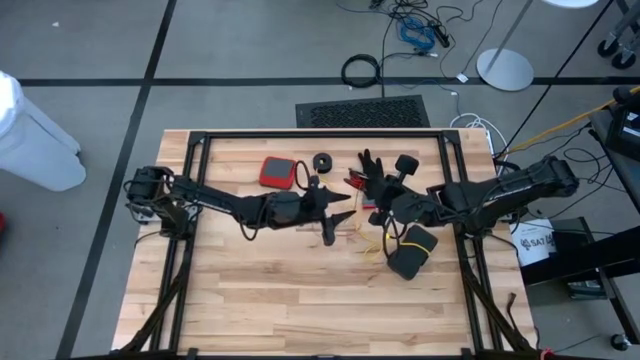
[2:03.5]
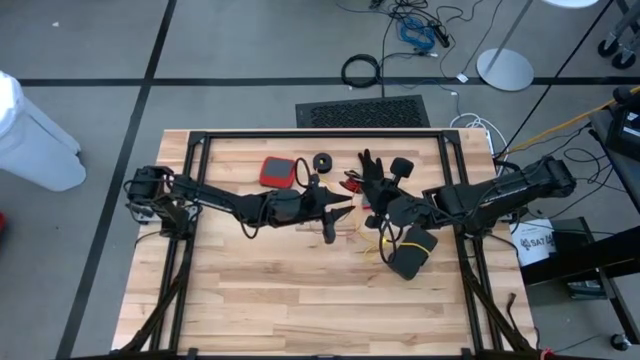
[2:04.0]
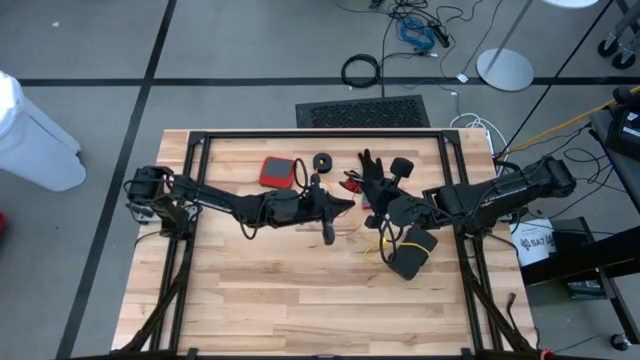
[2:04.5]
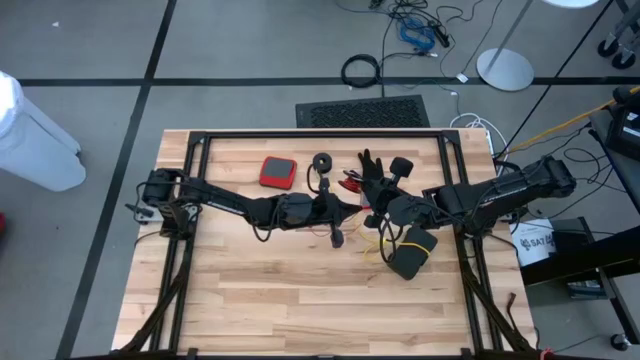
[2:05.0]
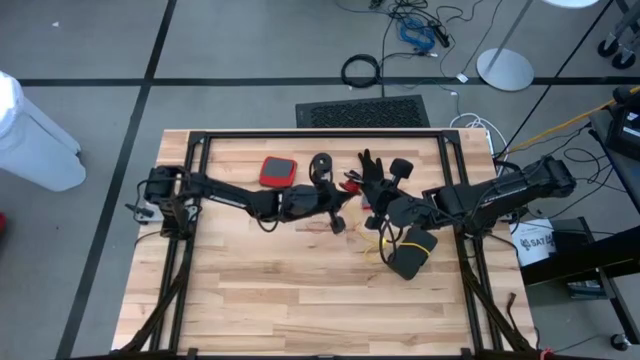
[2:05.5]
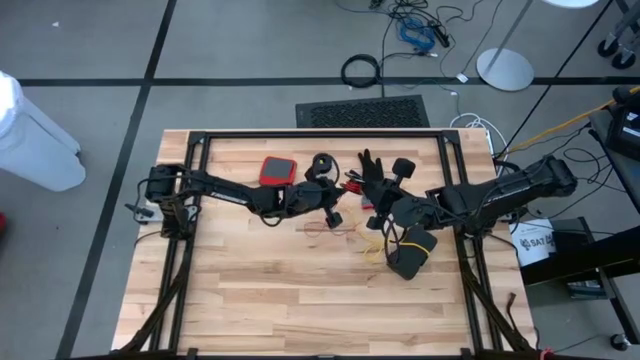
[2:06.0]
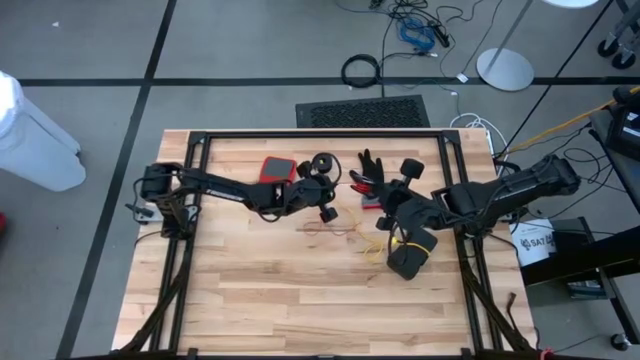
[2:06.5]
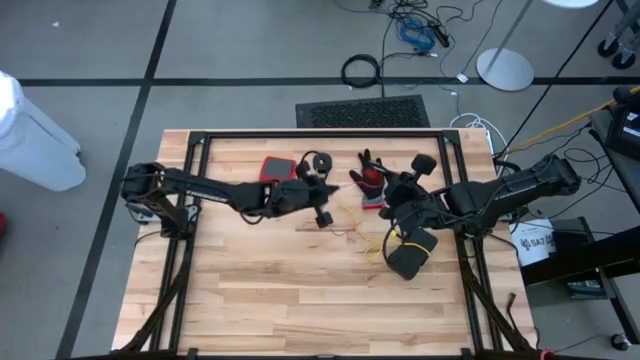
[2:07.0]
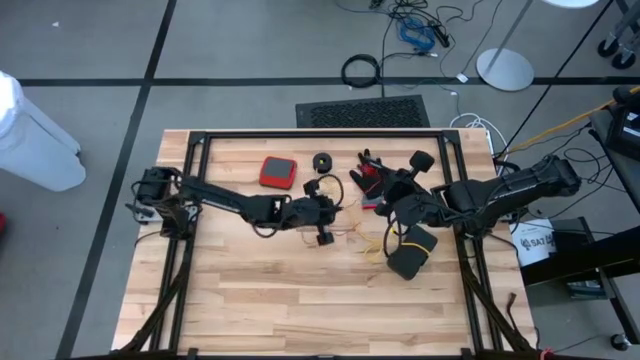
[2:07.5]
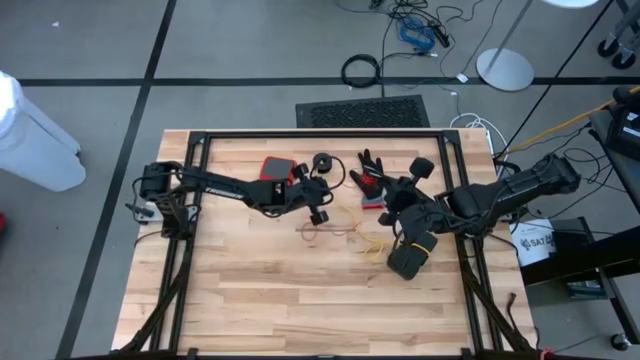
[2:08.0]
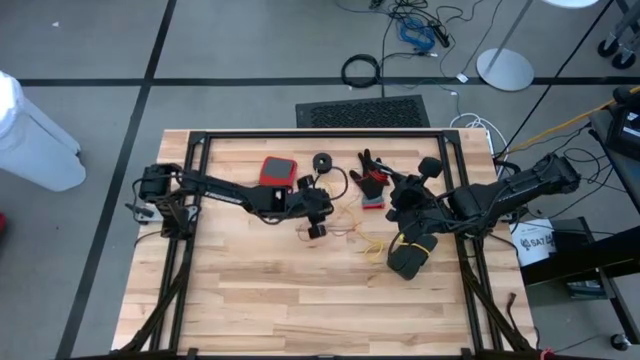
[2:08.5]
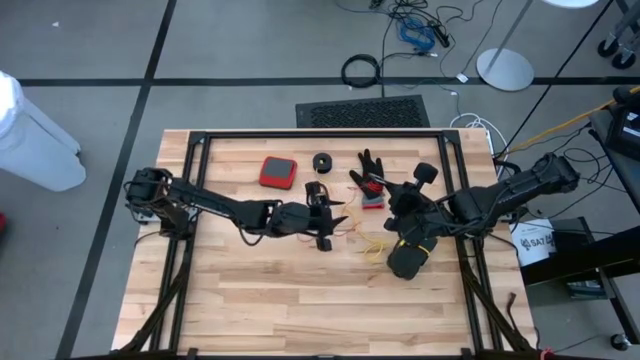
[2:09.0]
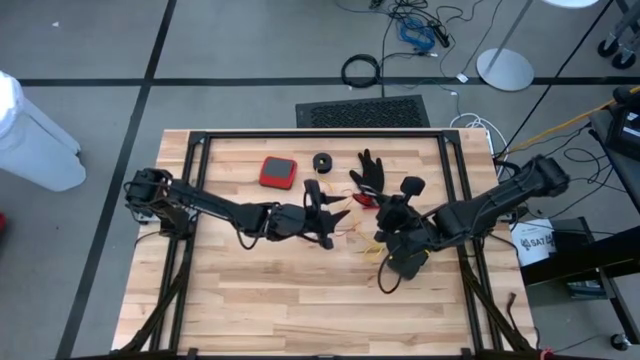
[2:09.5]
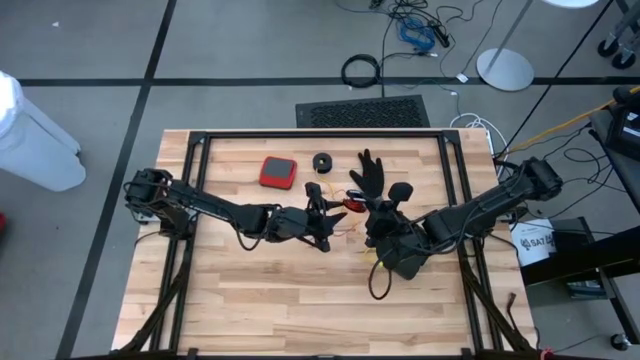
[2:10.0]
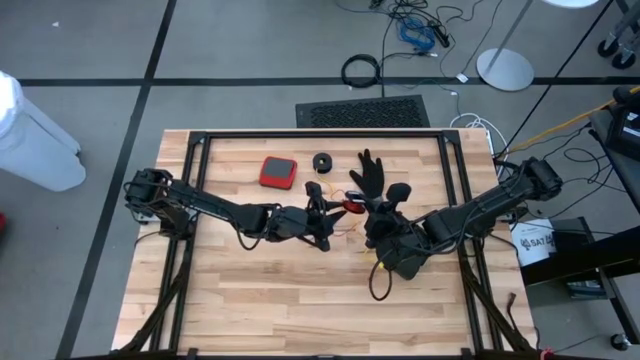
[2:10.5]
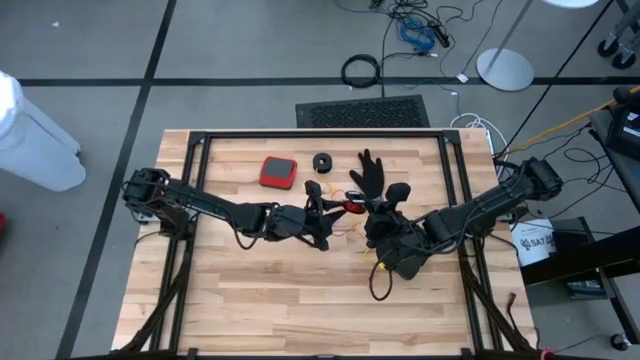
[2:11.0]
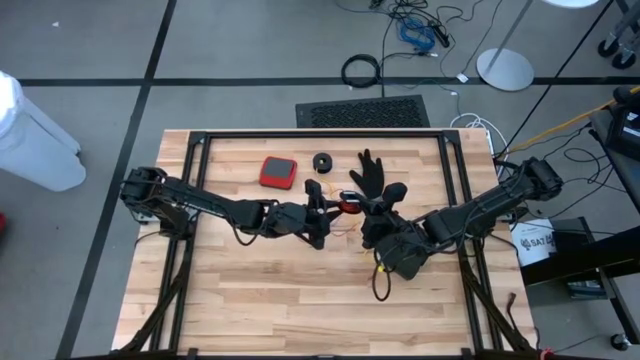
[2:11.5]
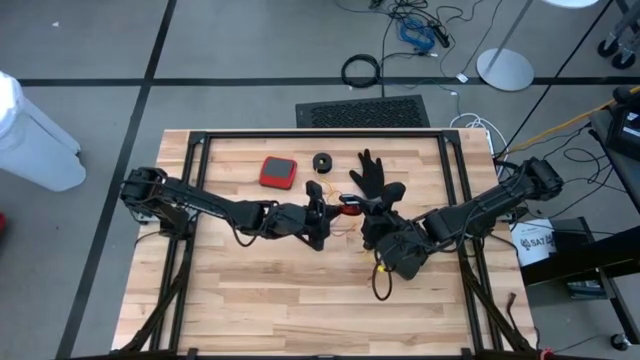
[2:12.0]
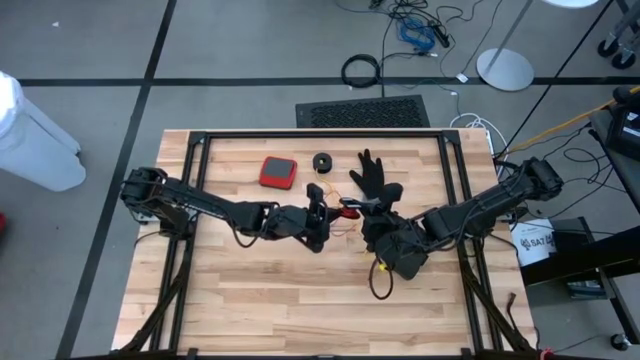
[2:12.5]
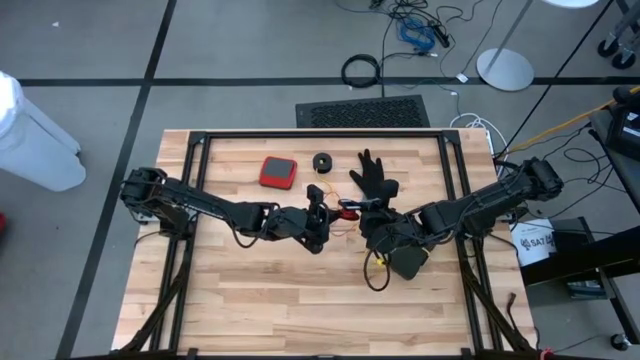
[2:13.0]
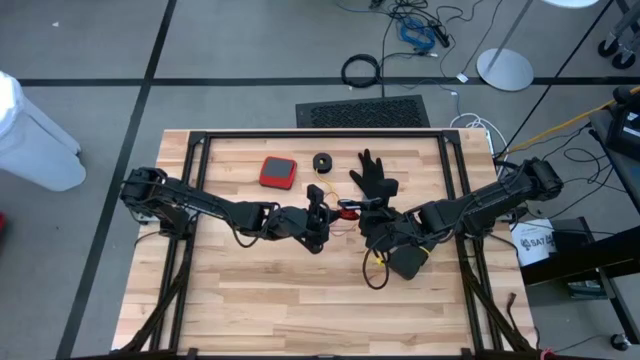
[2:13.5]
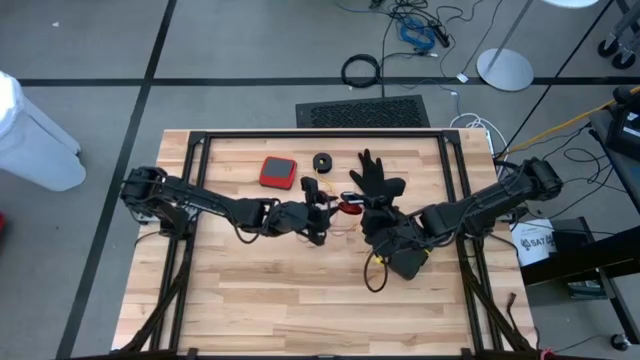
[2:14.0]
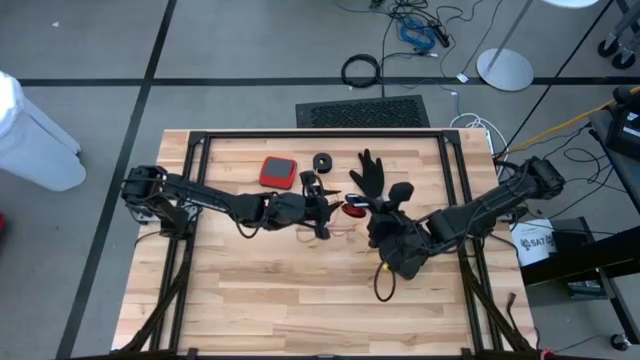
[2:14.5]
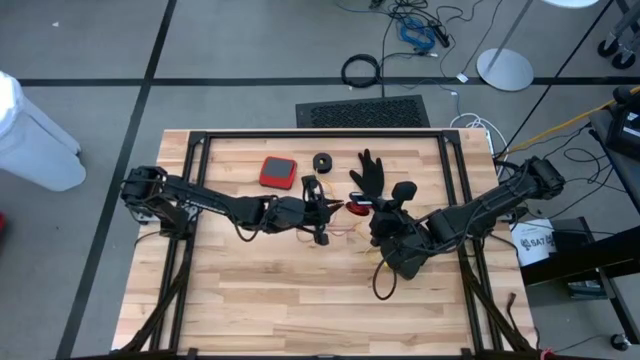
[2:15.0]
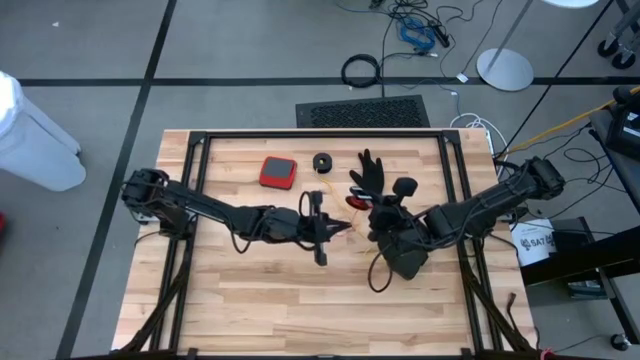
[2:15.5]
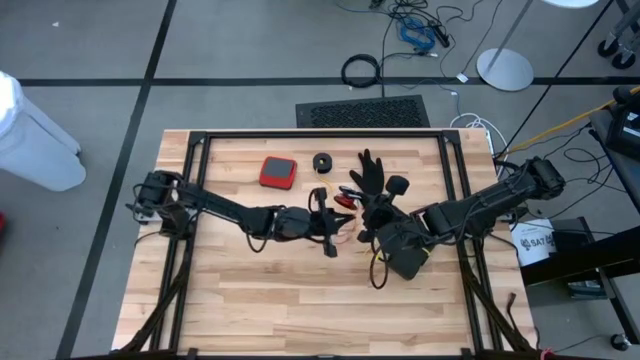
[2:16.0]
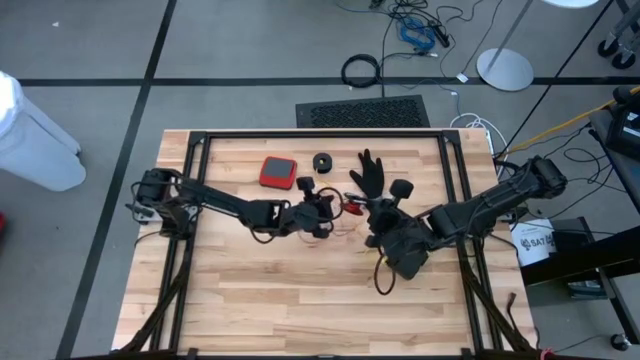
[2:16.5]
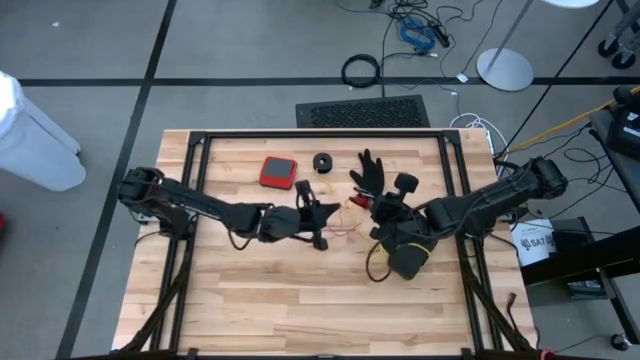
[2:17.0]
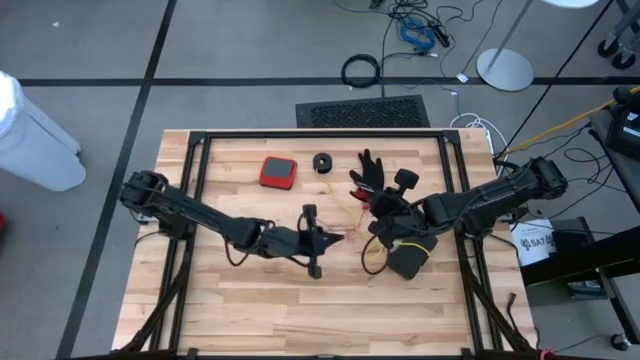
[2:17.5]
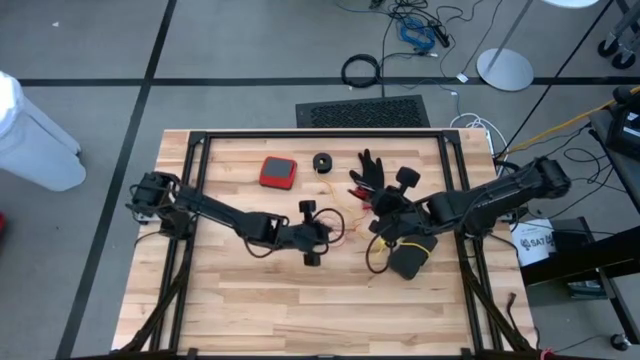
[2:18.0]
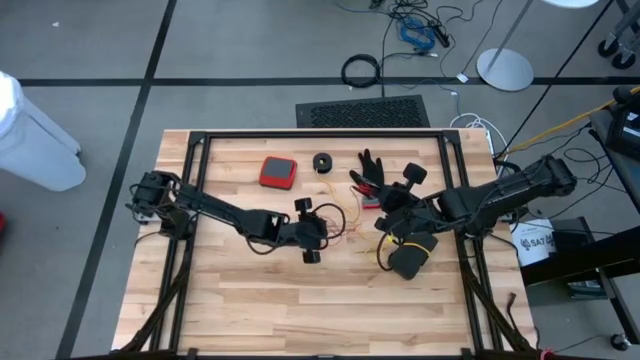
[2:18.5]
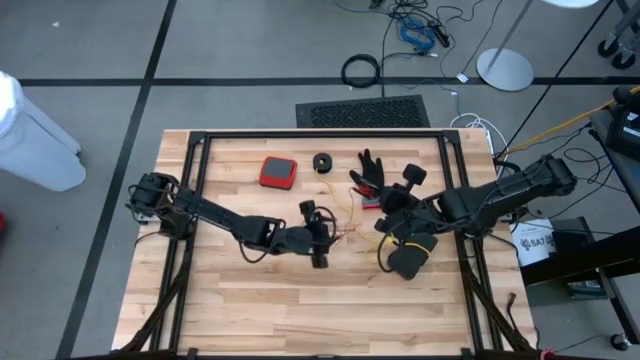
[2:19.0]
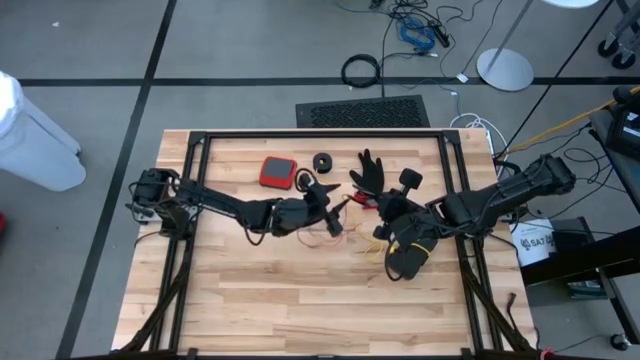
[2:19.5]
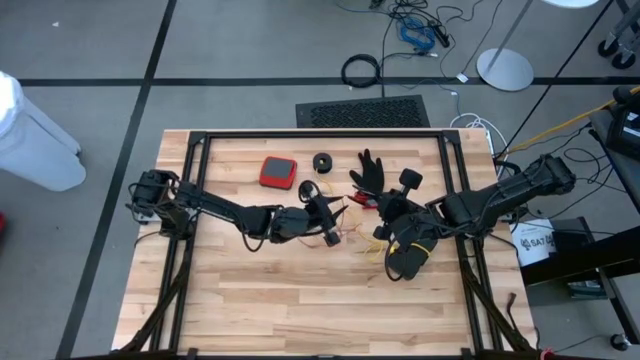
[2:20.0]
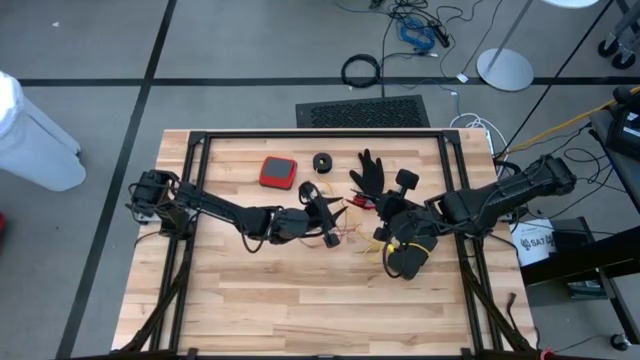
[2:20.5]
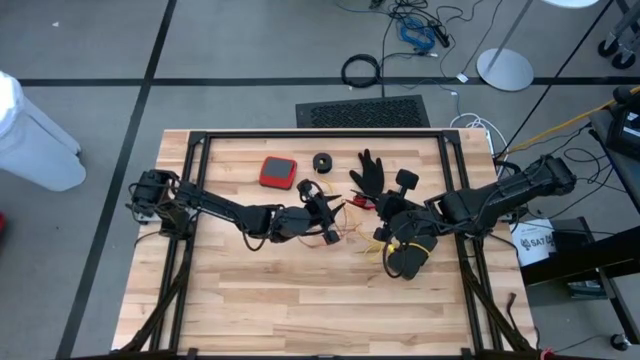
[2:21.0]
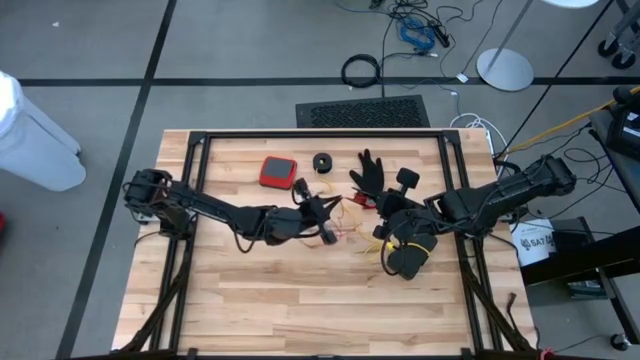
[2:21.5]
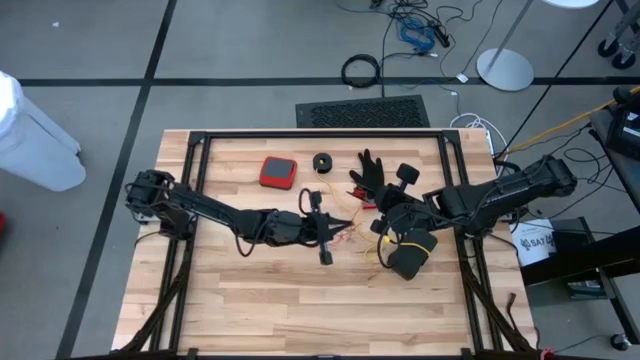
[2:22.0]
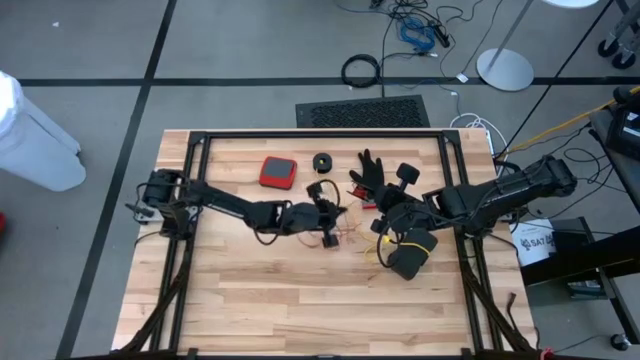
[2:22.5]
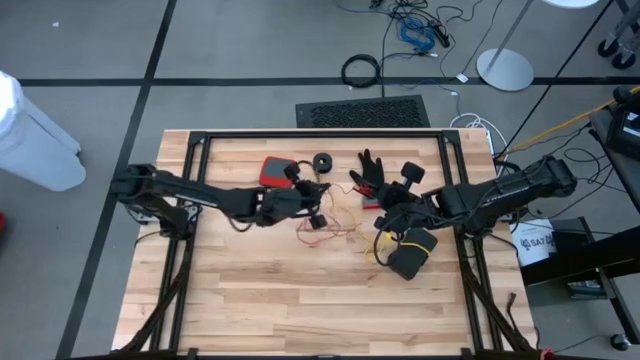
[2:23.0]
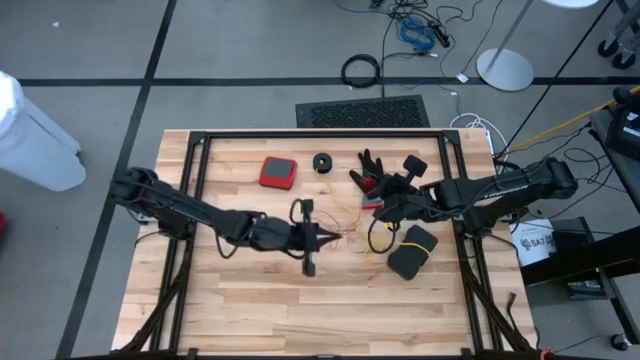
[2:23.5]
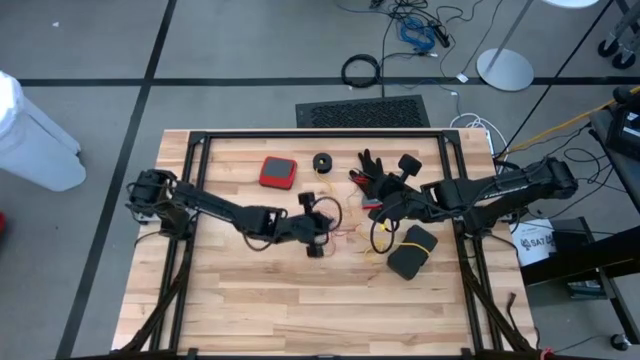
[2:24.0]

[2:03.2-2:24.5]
Task: Coil cords
Uncoil the red wire from the spool
